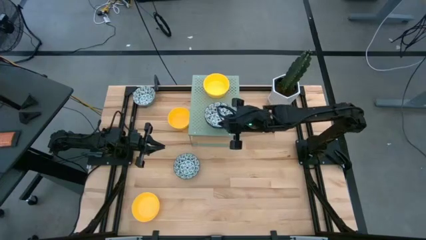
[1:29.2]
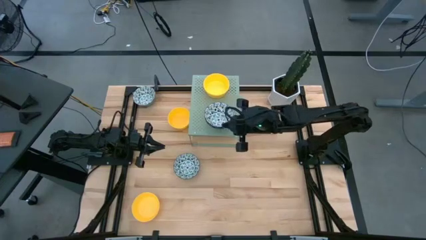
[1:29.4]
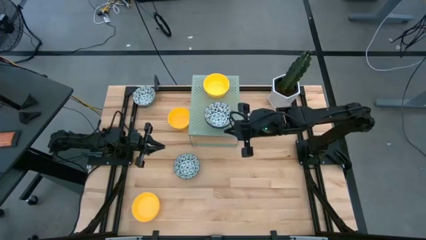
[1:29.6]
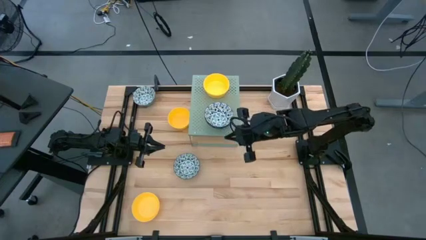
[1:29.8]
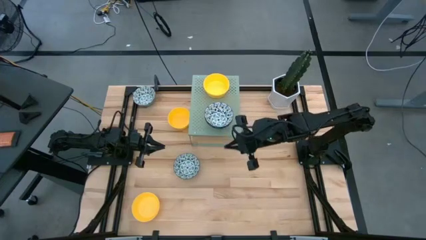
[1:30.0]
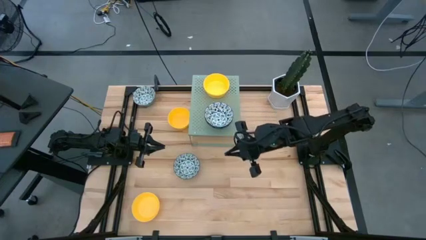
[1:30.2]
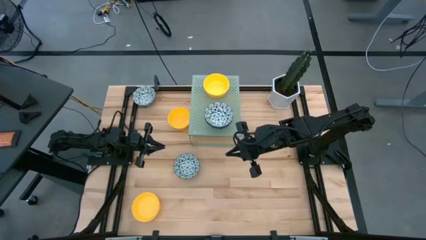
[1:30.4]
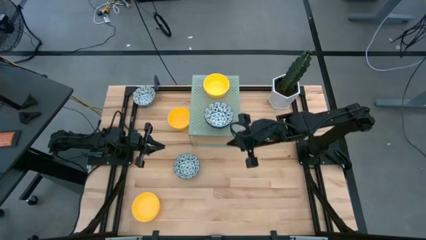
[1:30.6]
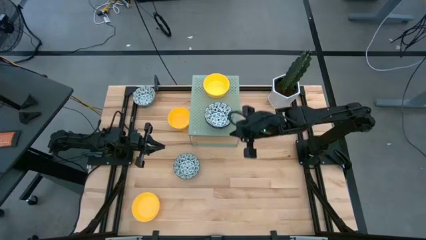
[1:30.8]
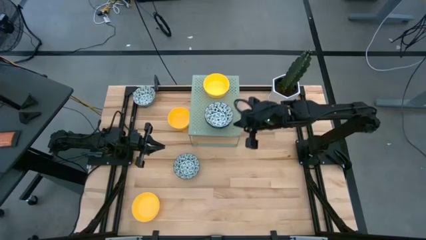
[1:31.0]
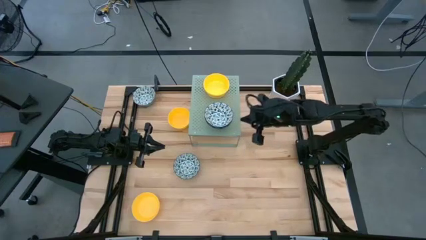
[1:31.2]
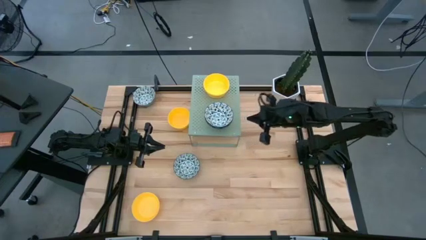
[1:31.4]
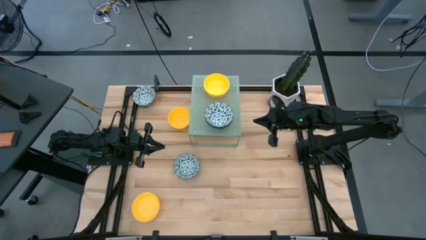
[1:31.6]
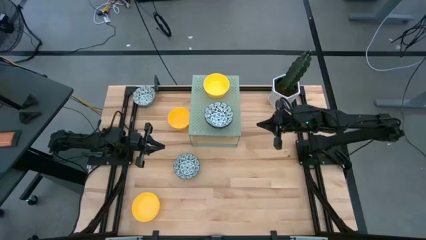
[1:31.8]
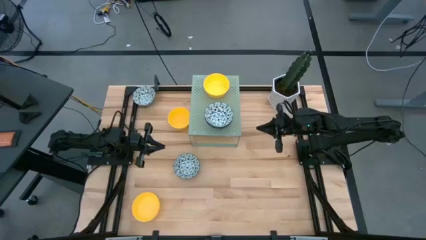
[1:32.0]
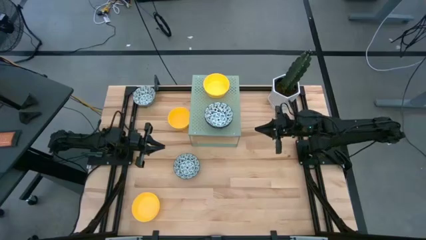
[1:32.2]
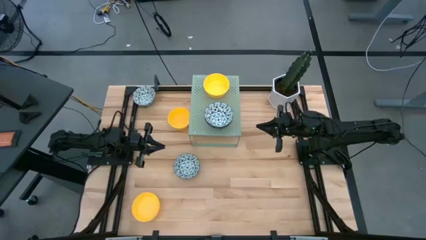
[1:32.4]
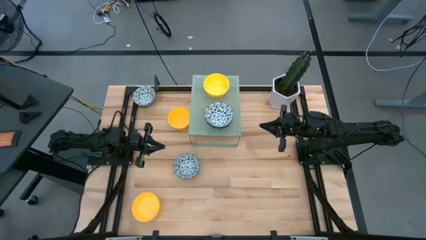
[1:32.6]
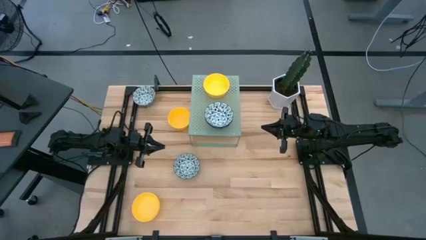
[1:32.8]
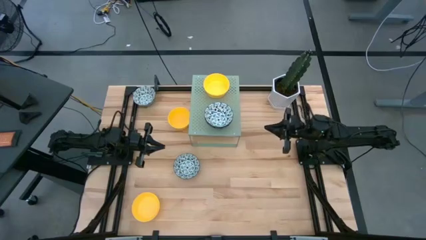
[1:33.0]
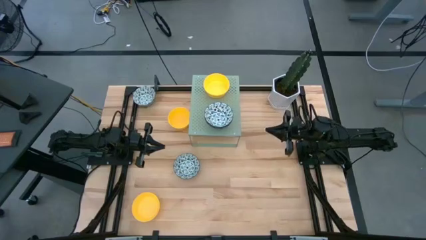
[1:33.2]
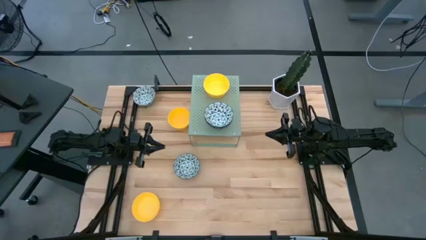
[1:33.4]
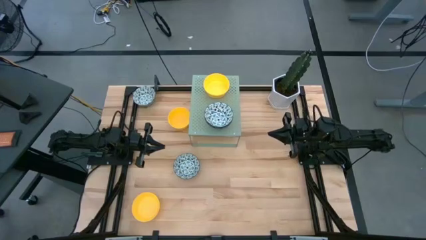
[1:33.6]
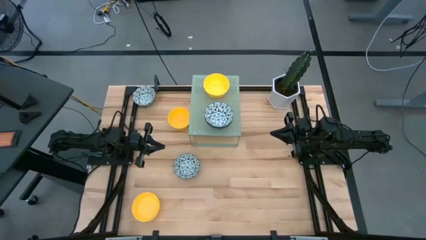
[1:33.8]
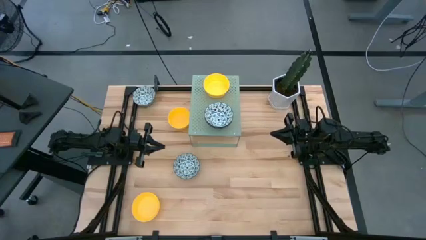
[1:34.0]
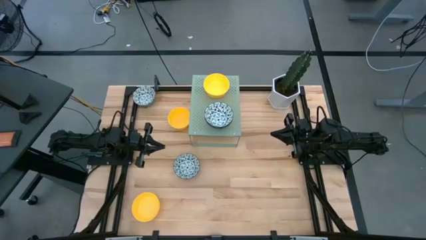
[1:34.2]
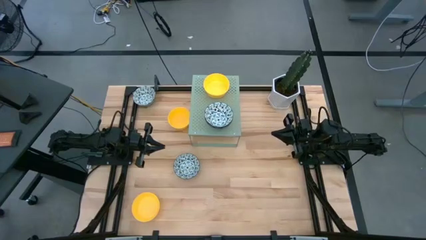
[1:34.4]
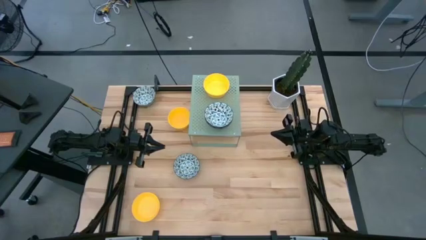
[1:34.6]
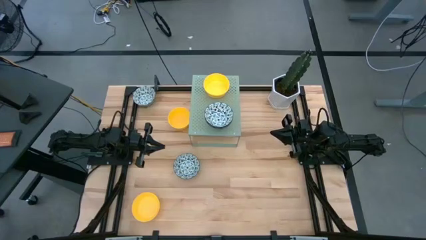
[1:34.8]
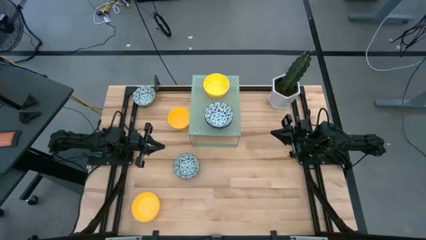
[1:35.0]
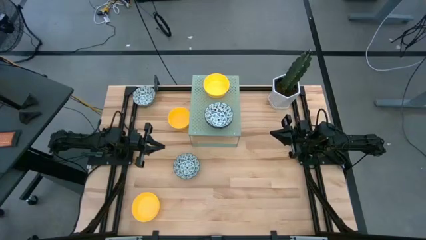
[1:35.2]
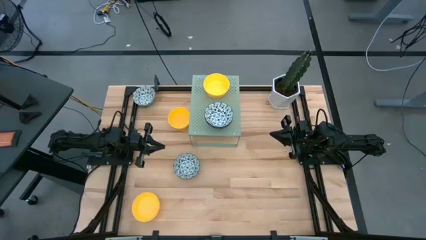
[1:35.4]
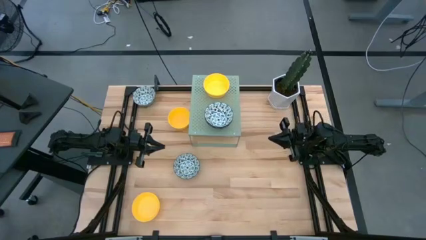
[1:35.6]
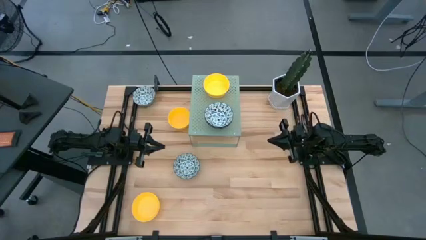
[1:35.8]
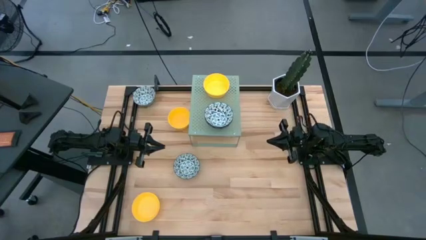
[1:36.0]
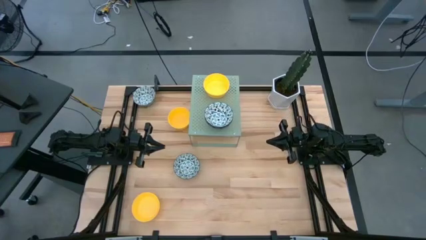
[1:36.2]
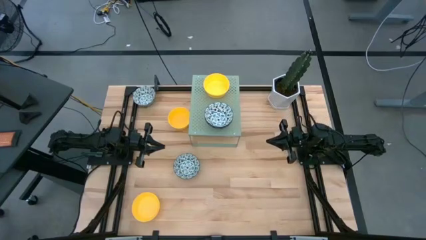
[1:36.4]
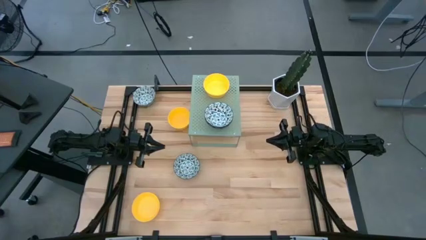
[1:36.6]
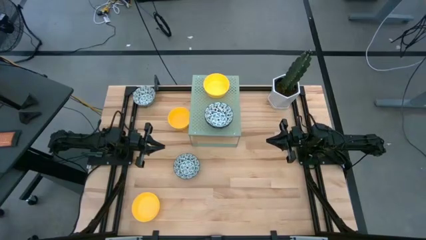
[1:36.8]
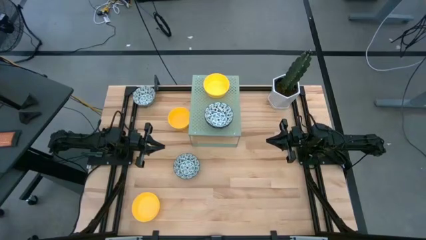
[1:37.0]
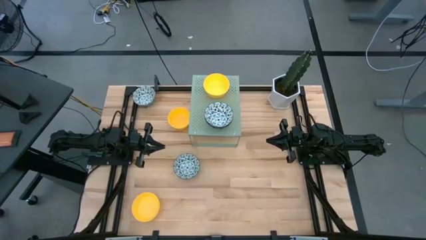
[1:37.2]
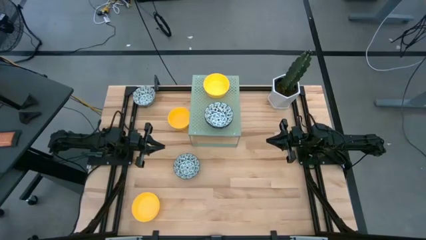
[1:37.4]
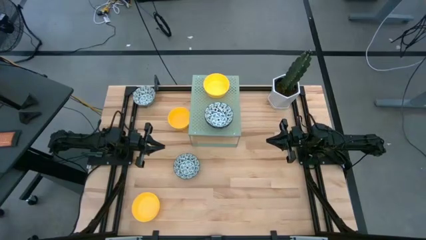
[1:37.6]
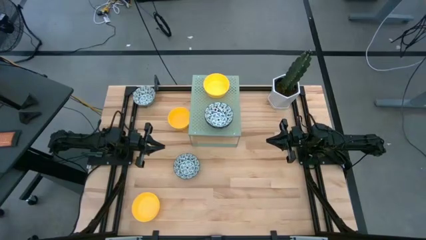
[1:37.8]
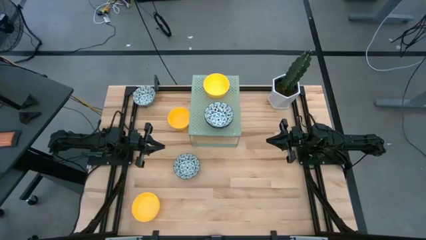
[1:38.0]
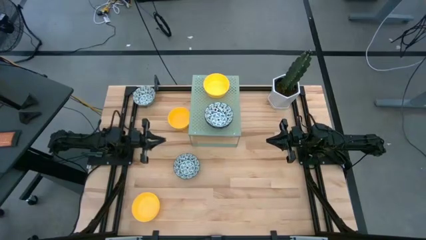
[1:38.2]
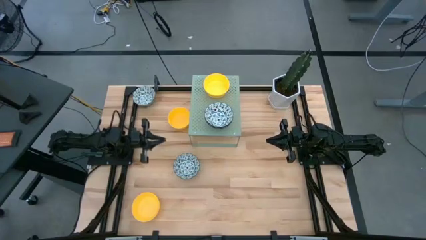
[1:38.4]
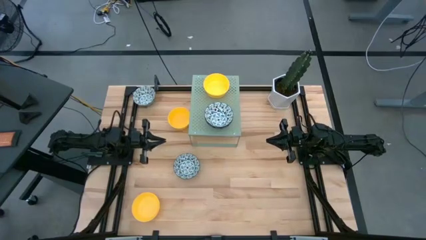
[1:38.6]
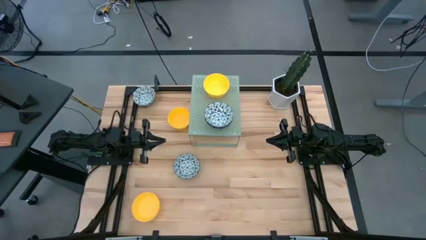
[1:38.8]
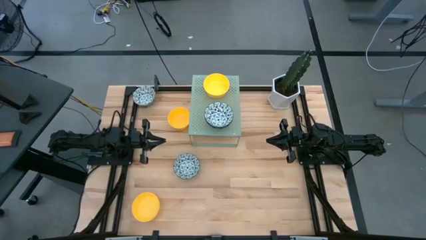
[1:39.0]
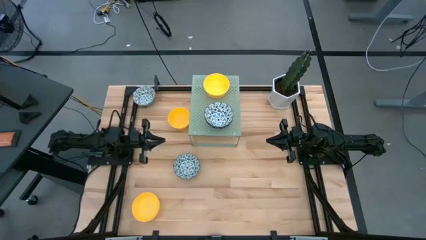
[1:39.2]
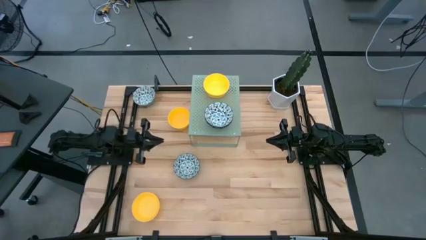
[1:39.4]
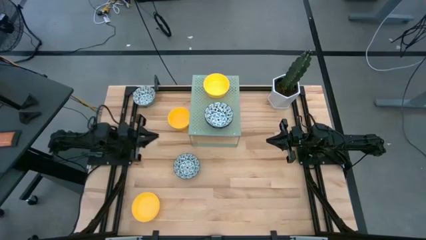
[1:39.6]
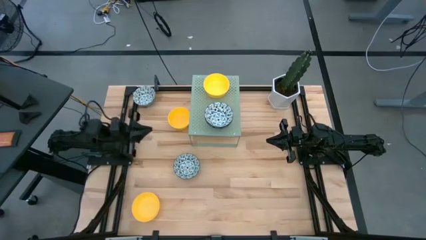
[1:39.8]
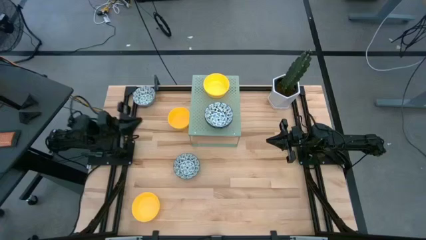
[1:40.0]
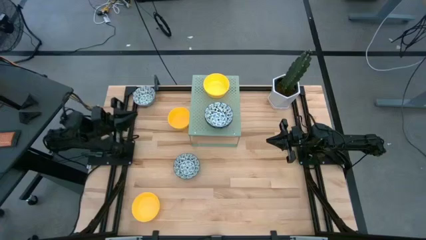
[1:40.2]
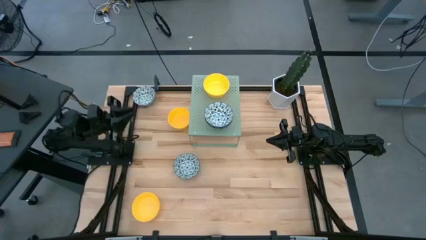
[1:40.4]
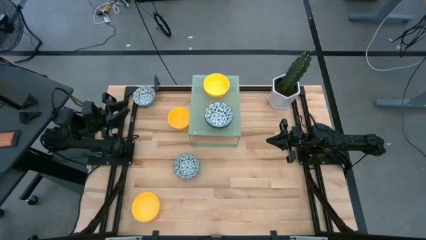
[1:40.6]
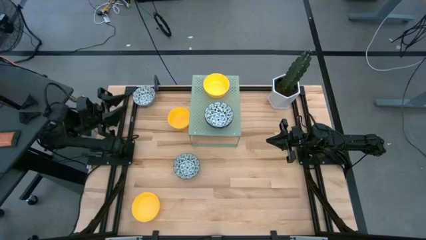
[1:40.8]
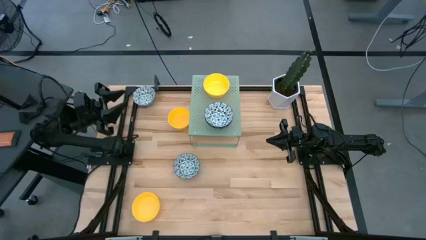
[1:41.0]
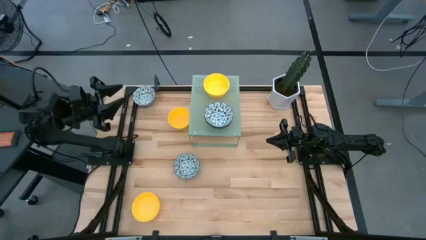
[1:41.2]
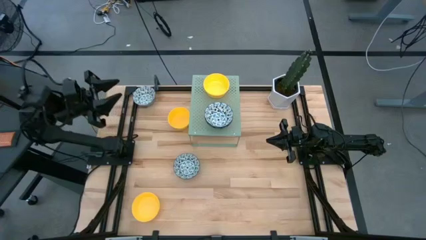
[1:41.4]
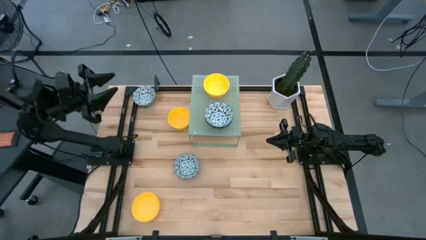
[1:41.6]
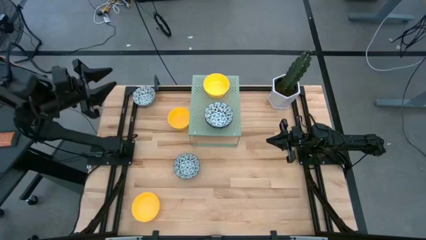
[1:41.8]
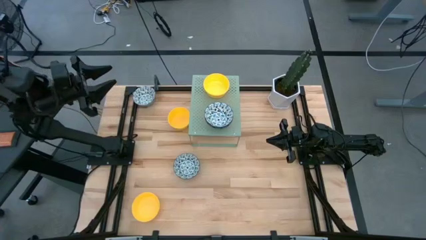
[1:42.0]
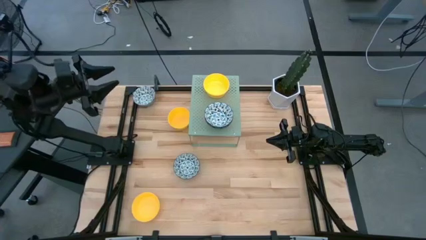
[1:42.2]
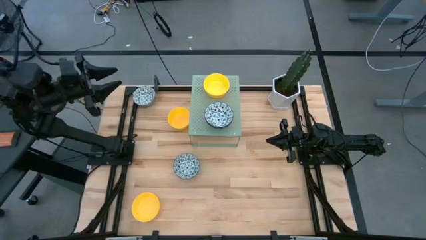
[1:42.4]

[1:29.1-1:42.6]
Task: Pick & Place Mini bowls
Stack the blue and white bowl on top of the other blue and white bowls on the shelf
